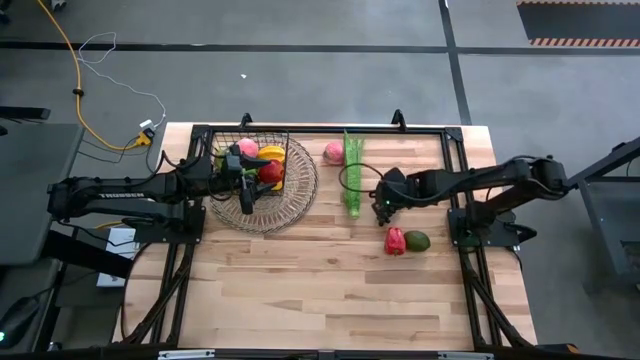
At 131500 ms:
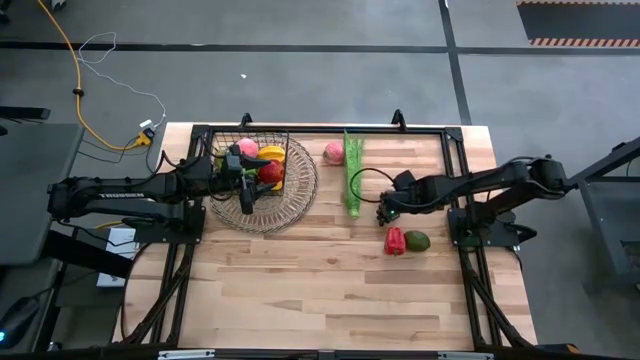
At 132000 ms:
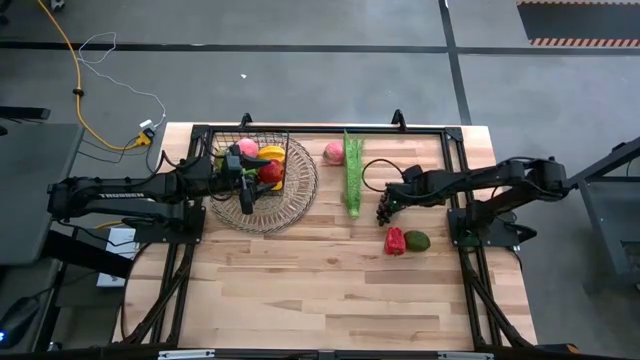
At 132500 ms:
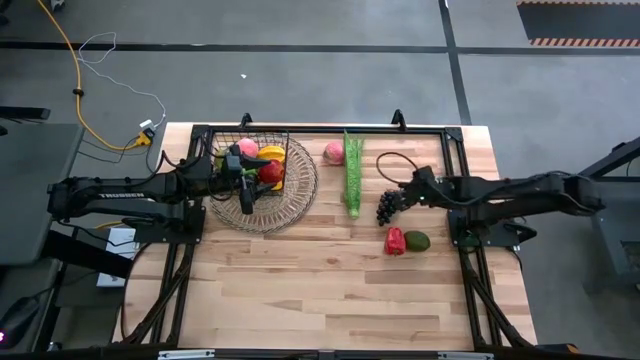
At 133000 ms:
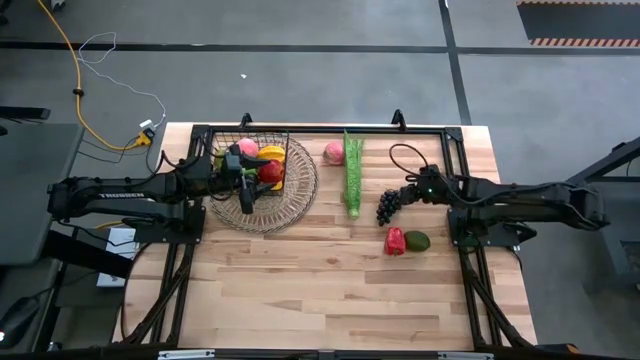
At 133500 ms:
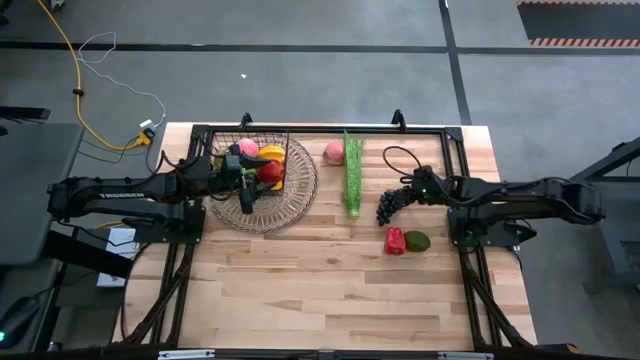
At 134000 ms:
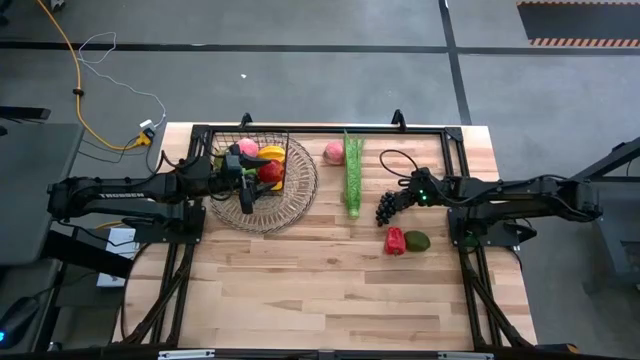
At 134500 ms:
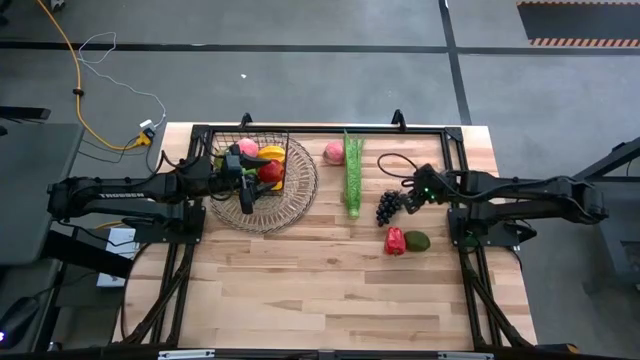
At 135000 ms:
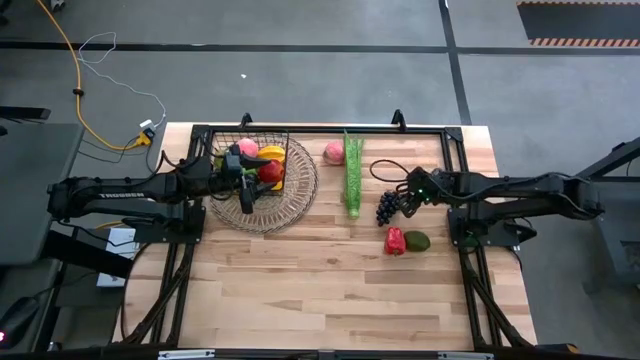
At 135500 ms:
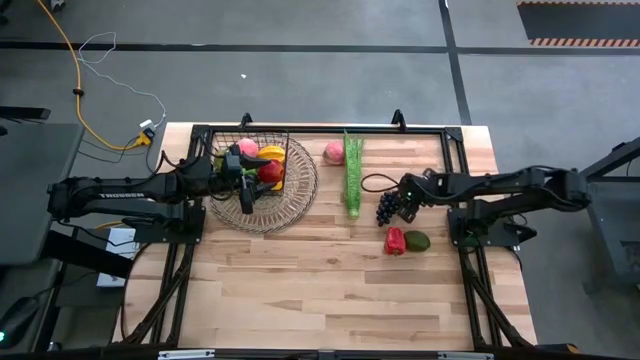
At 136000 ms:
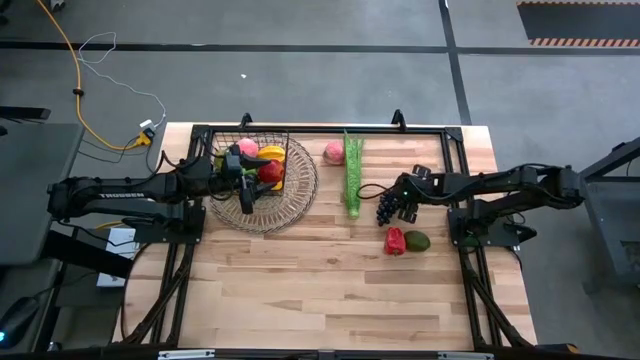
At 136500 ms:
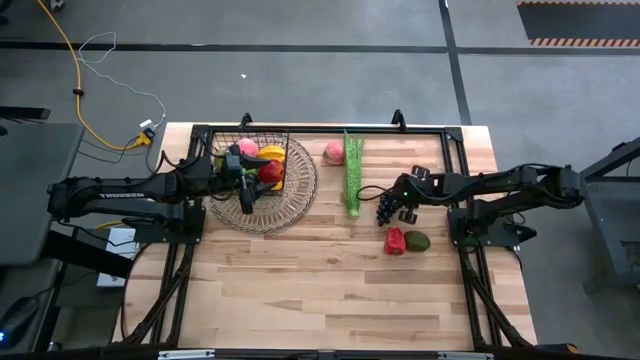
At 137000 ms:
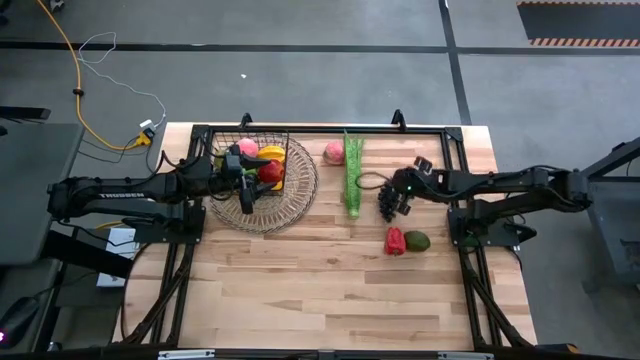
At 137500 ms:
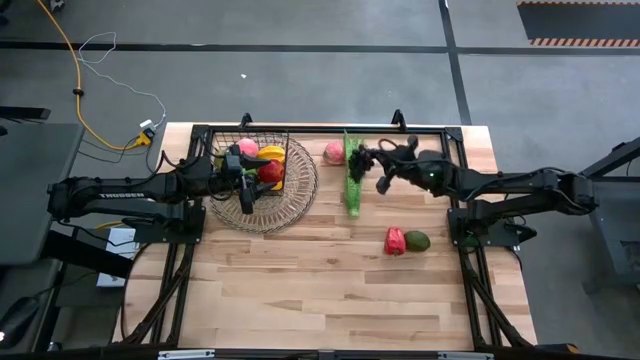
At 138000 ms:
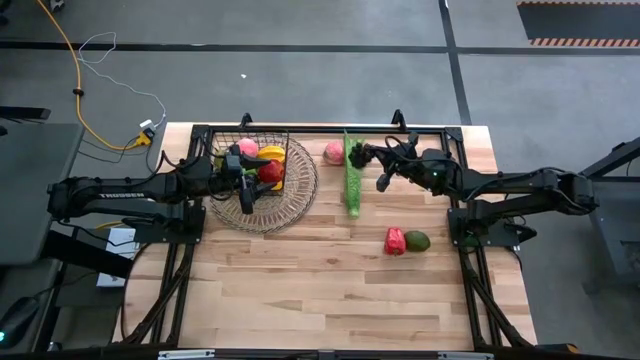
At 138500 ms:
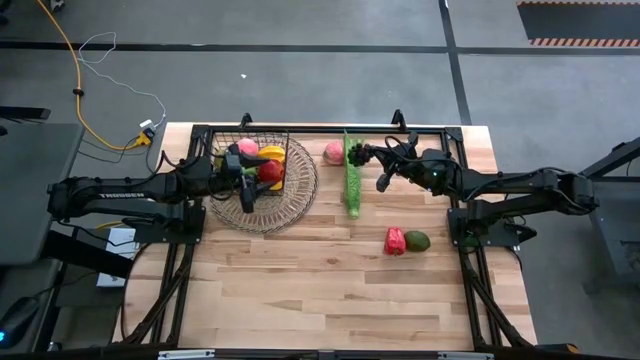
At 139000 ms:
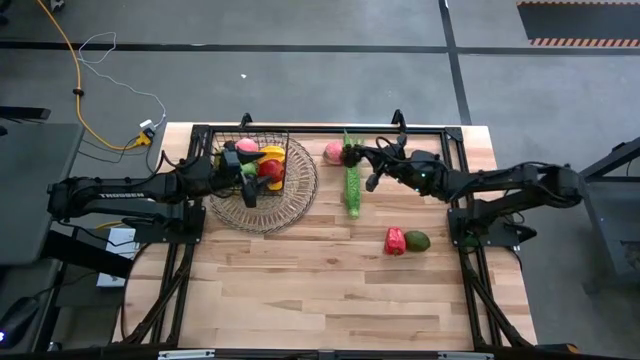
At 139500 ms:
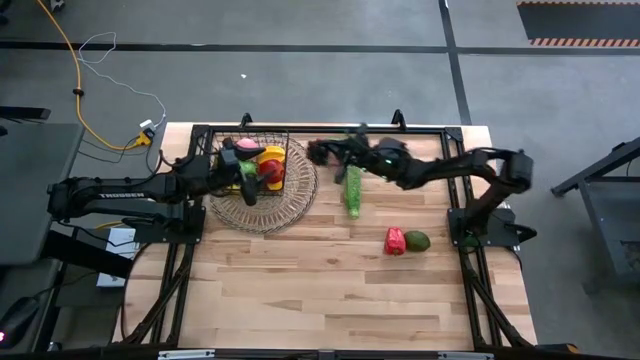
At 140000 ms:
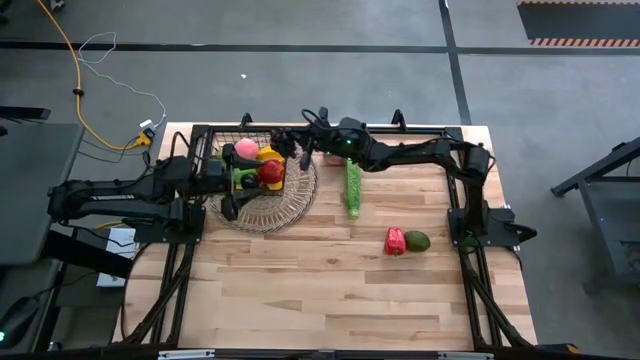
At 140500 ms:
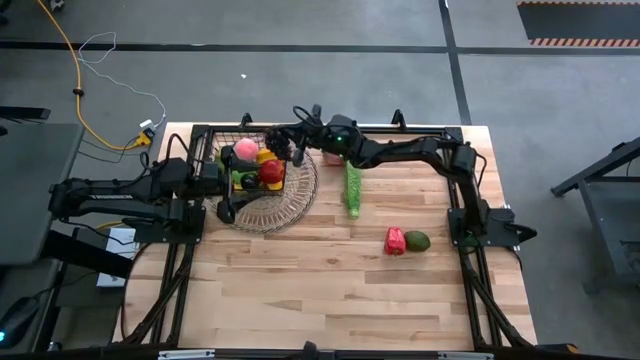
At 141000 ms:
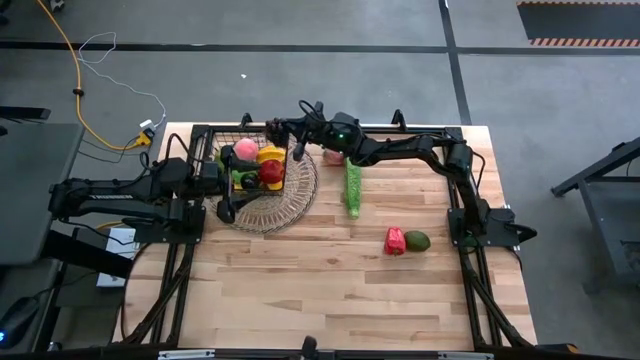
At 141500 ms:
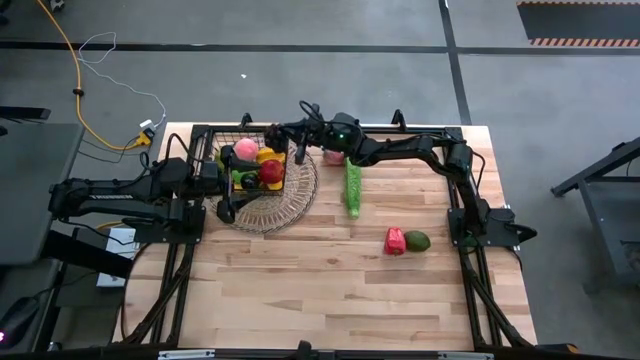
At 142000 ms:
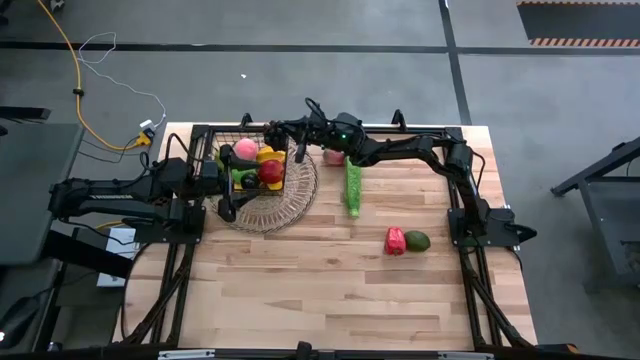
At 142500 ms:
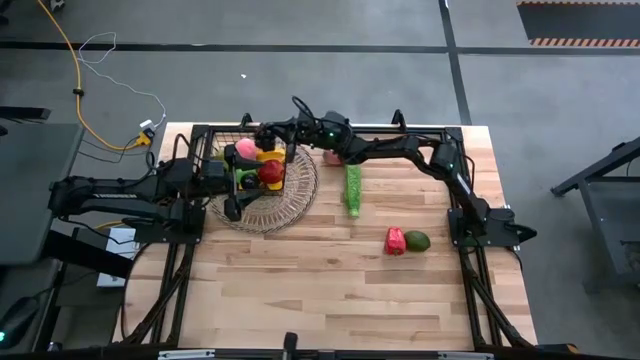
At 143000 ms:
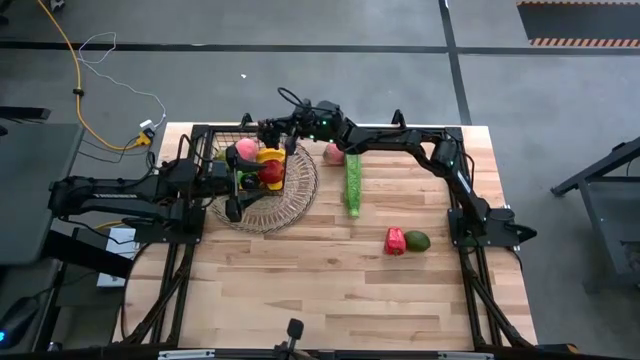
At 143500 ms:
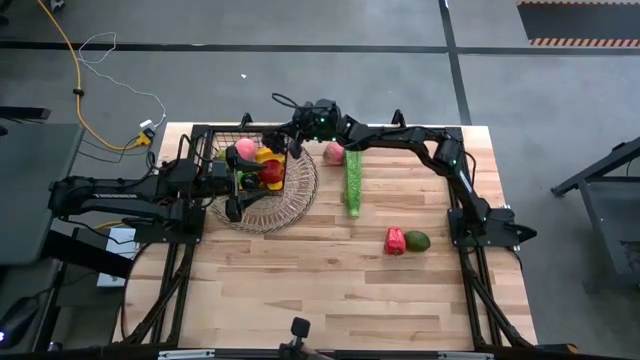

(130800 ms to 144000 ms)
Task: Build produce basket
Put the black grapes into the black wire basket

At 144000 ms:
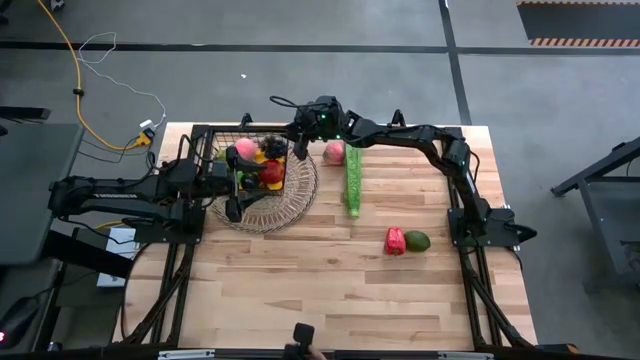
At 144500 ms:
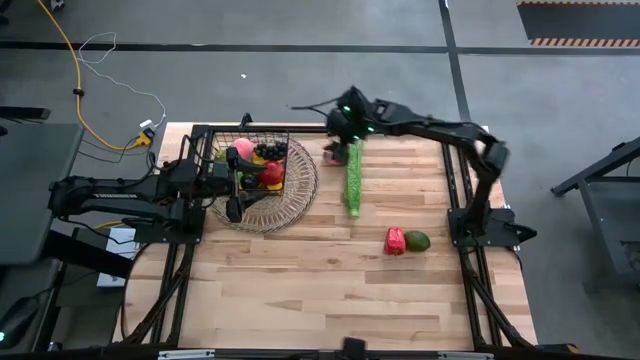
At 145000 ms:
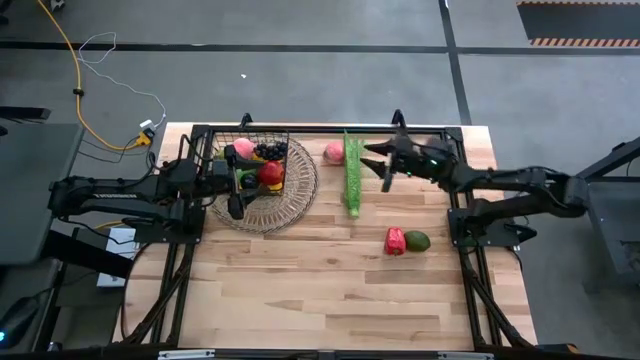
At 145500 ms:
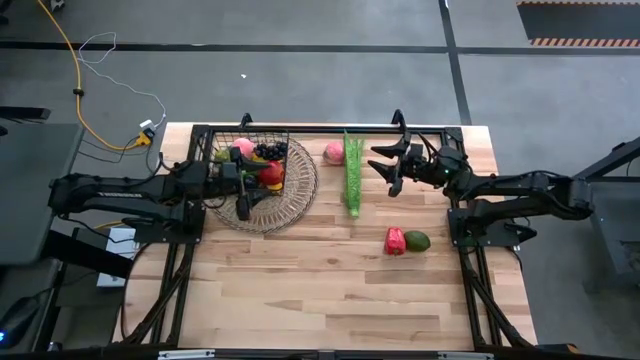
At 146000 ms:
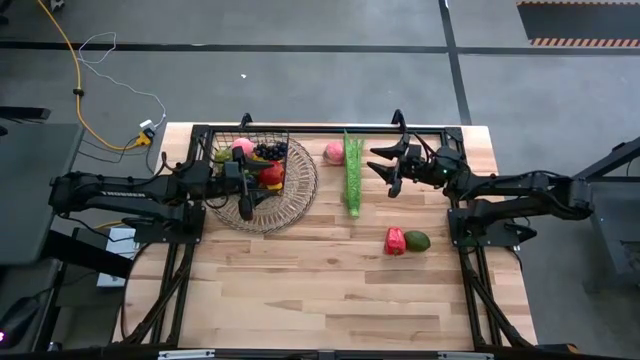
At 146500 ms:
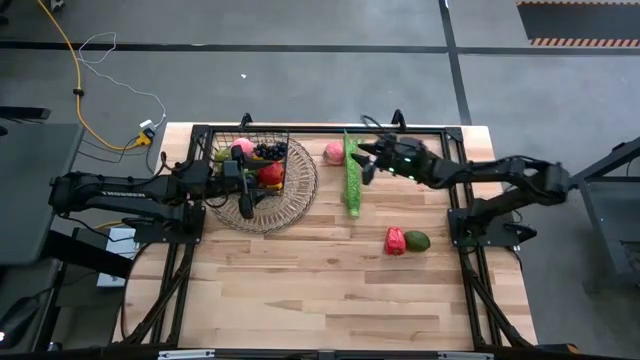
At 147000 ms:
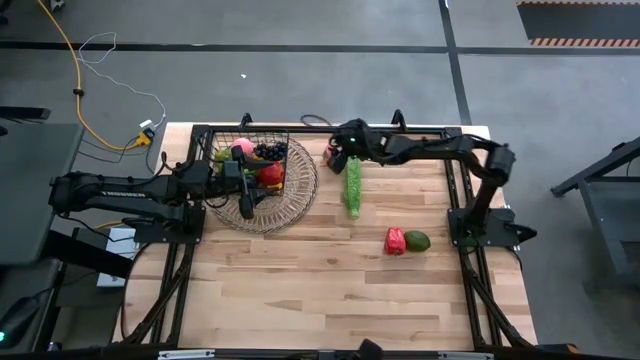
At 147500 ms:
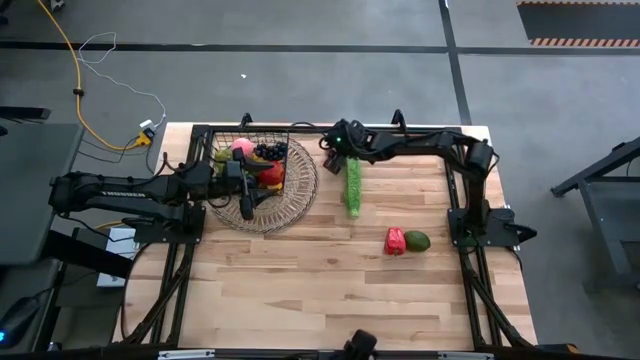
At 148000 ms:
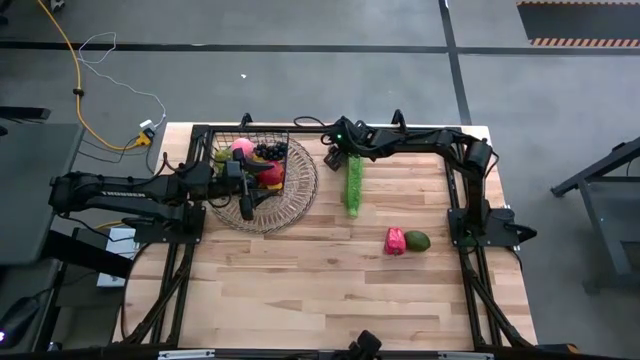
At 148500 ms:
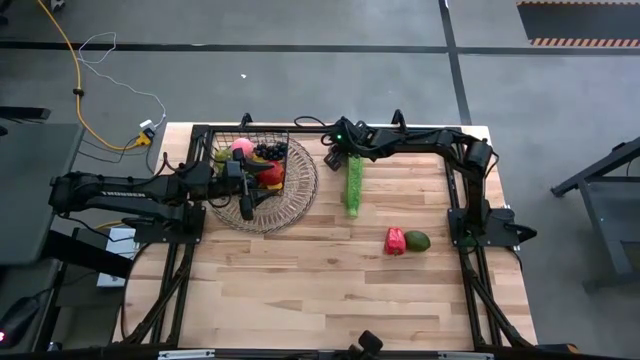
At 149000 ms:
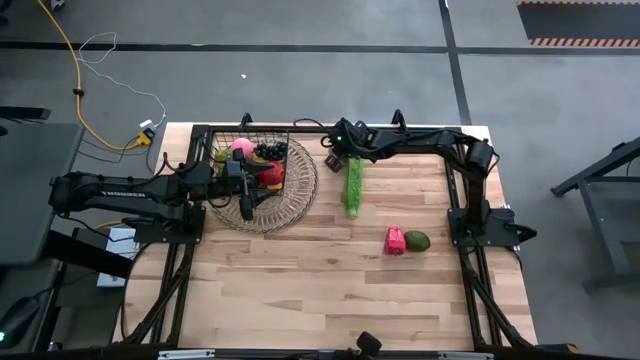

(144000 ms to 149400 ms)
Put the pink peach into the black wire basket

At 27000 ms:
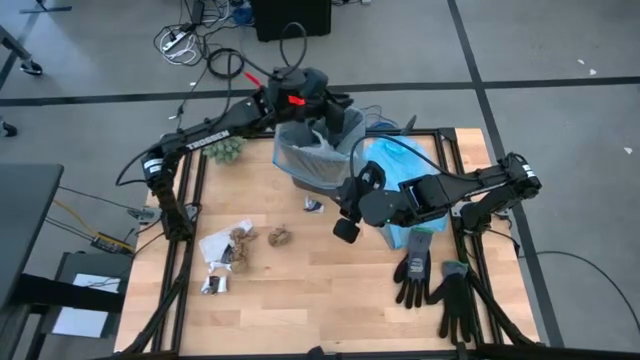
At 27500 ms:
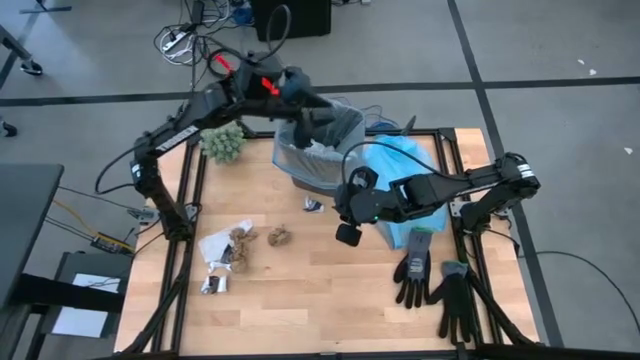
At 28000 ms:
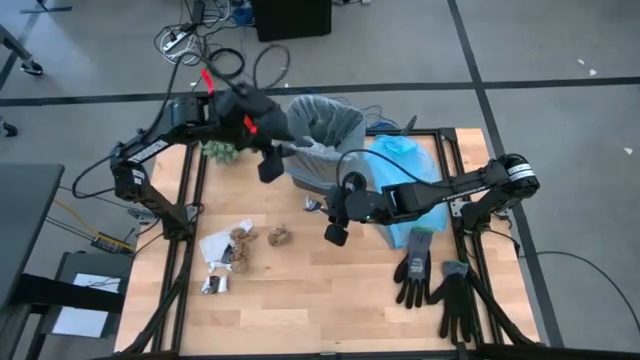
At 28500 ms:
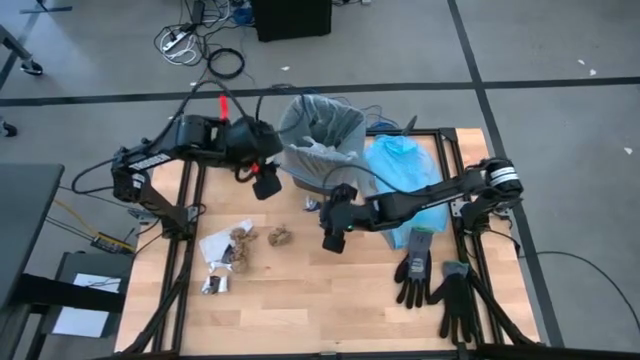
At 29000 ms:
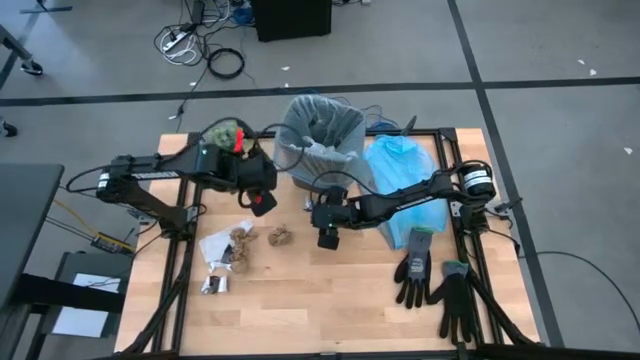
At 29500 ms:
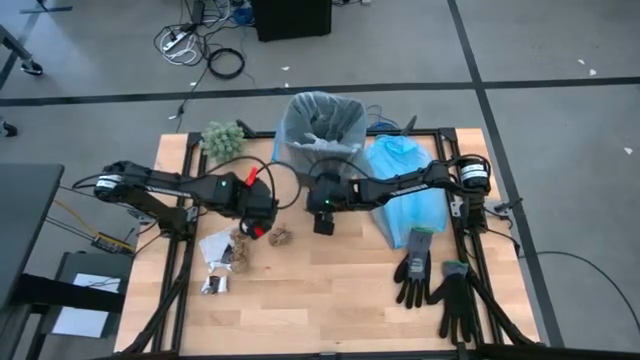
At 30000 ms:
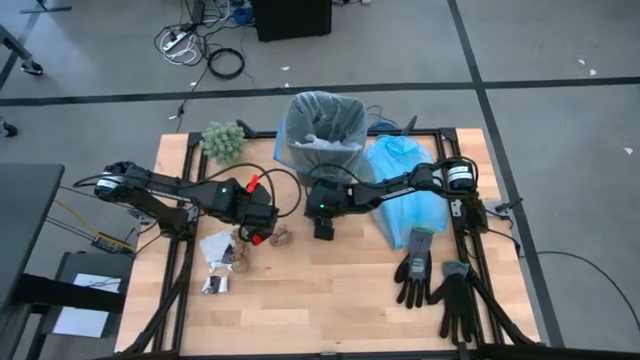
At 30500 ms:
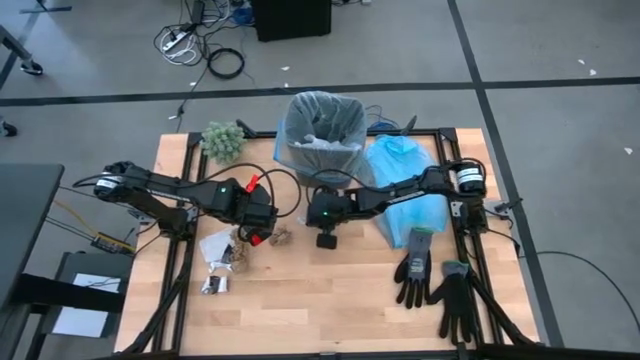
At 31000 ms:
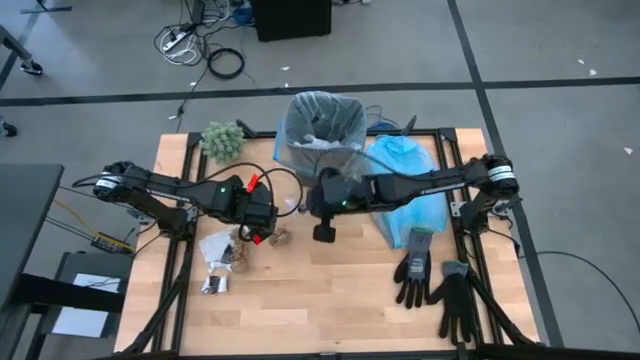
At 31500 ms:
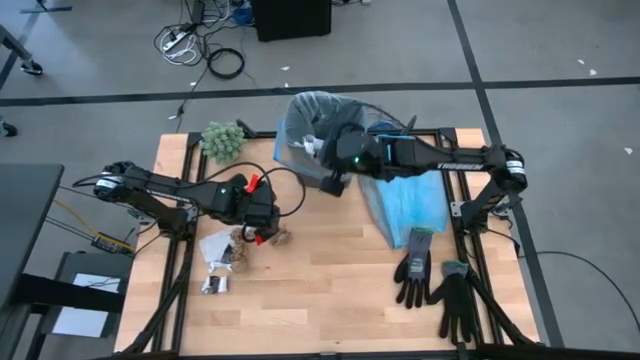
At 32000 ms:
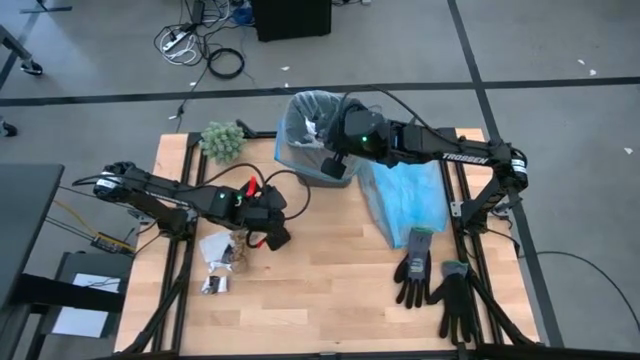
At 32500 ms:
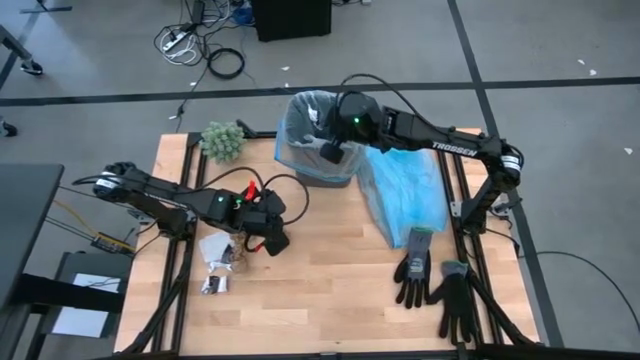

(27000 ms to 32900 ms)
Task: place trash/remove bag and relplace
Put the white paper into the trash bin
